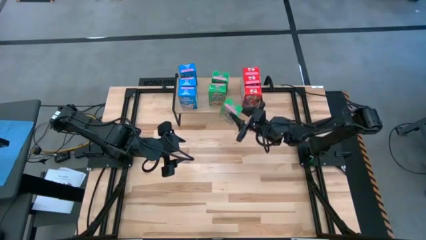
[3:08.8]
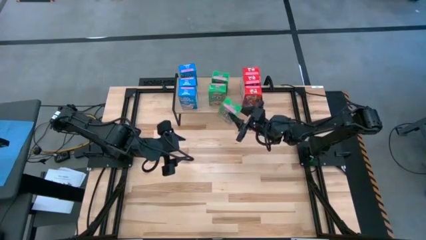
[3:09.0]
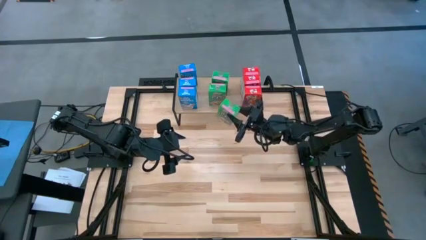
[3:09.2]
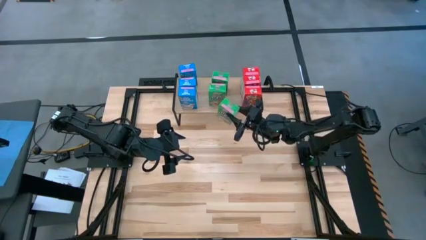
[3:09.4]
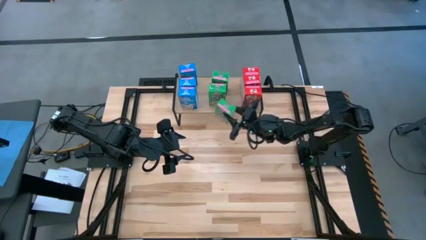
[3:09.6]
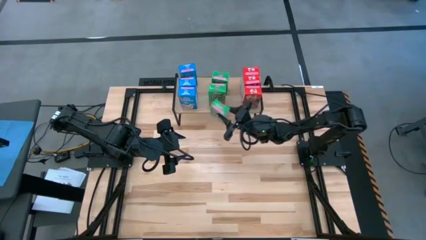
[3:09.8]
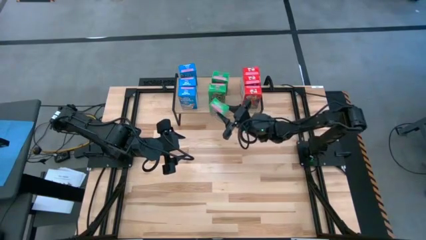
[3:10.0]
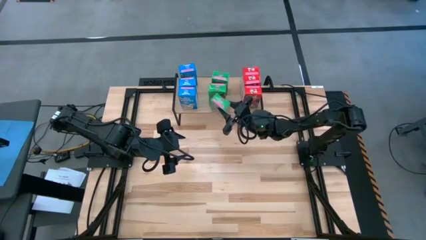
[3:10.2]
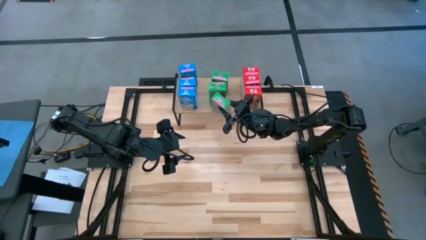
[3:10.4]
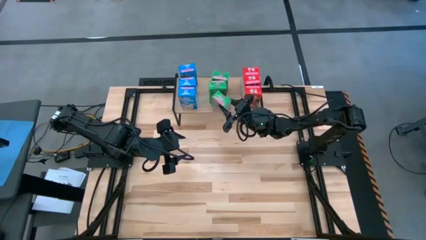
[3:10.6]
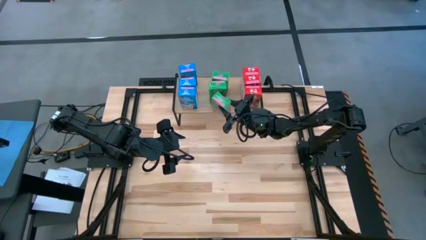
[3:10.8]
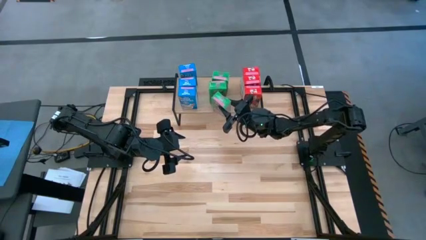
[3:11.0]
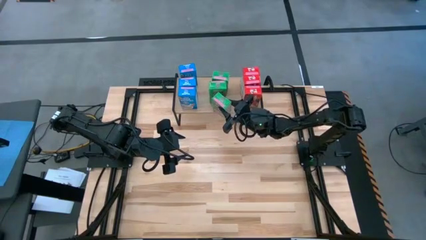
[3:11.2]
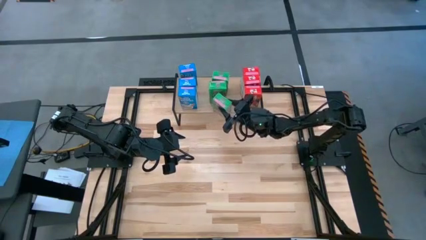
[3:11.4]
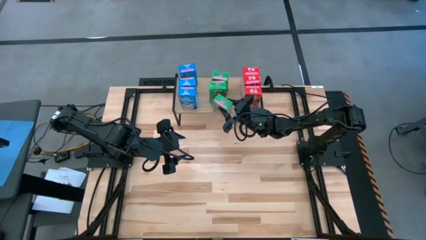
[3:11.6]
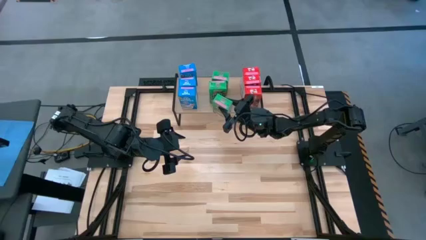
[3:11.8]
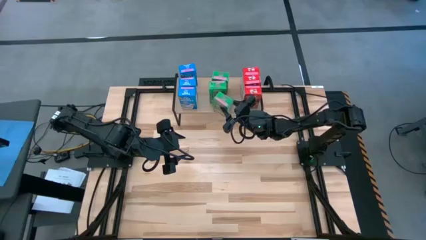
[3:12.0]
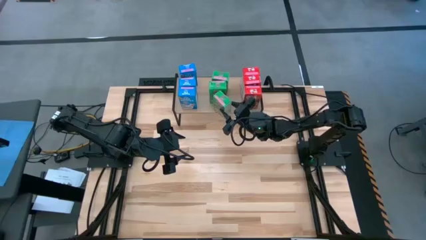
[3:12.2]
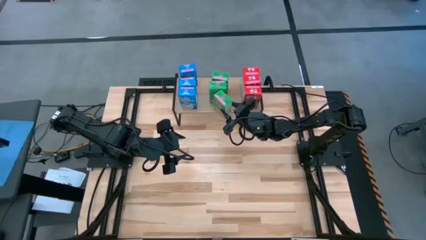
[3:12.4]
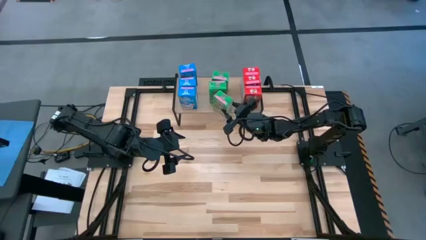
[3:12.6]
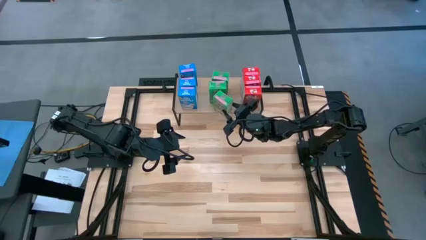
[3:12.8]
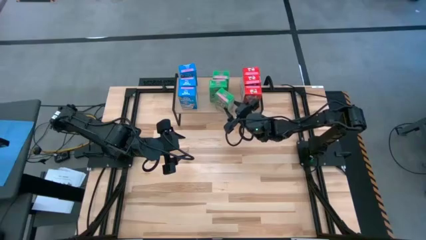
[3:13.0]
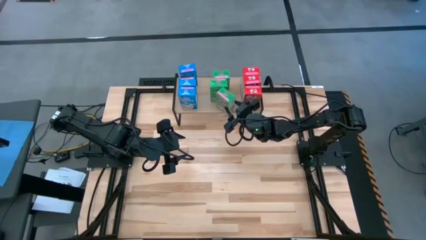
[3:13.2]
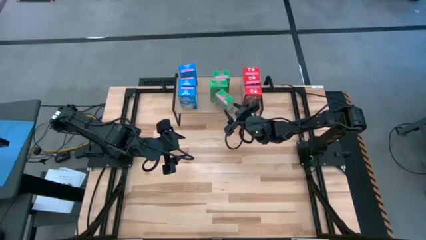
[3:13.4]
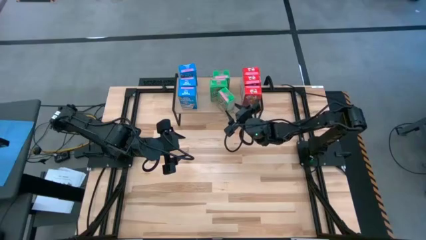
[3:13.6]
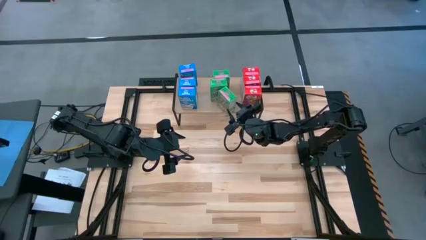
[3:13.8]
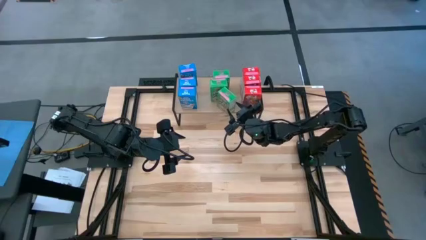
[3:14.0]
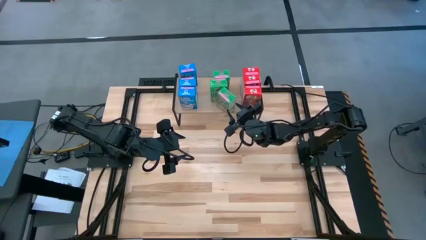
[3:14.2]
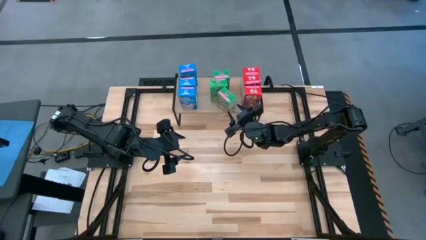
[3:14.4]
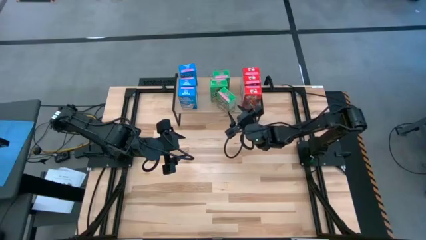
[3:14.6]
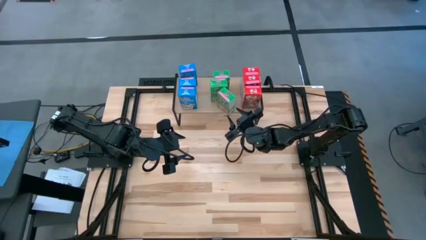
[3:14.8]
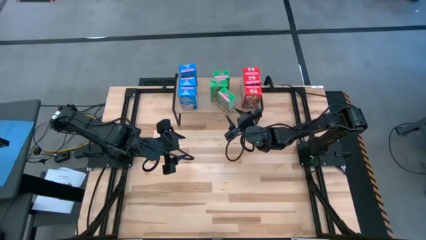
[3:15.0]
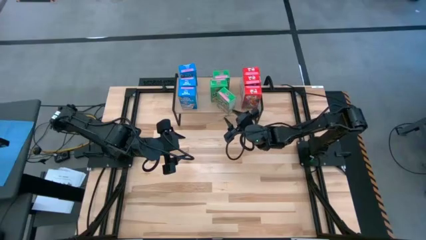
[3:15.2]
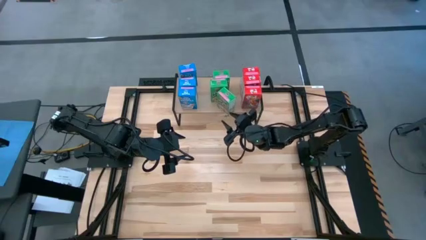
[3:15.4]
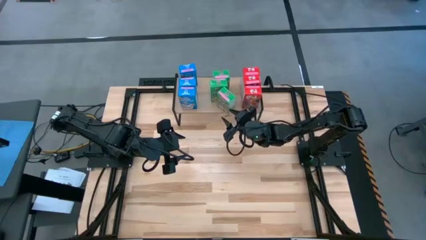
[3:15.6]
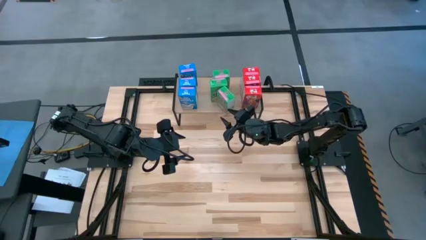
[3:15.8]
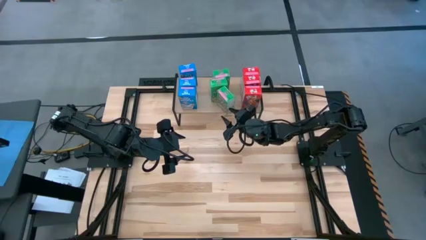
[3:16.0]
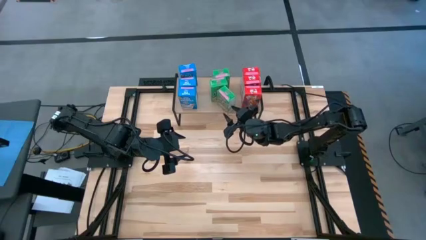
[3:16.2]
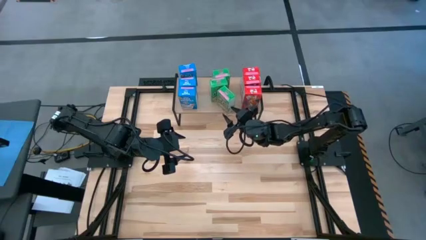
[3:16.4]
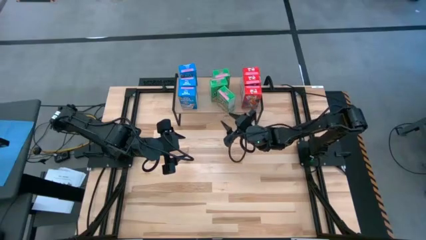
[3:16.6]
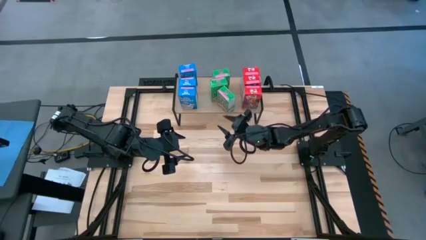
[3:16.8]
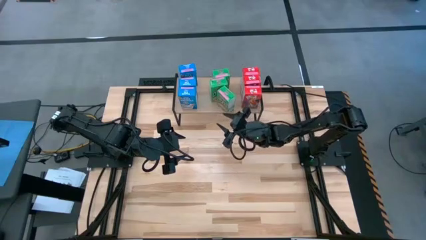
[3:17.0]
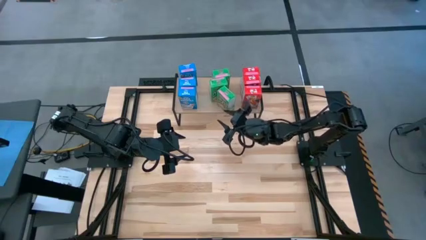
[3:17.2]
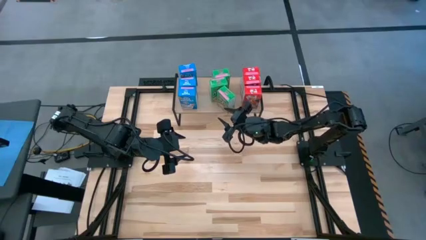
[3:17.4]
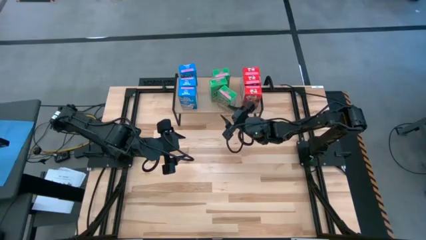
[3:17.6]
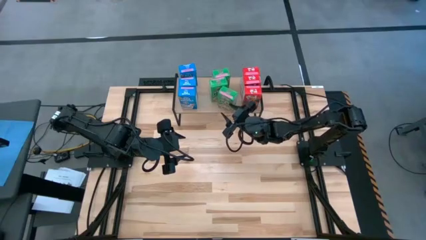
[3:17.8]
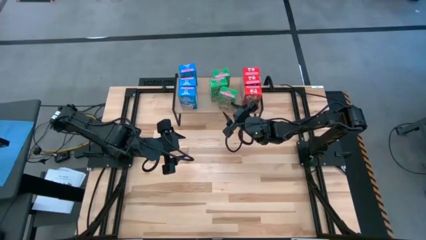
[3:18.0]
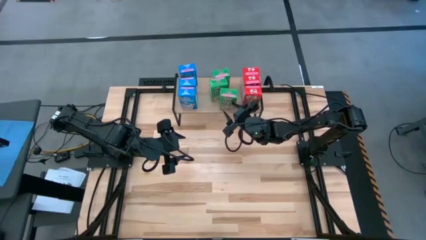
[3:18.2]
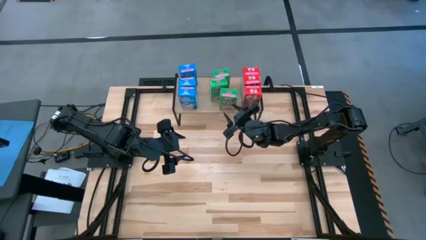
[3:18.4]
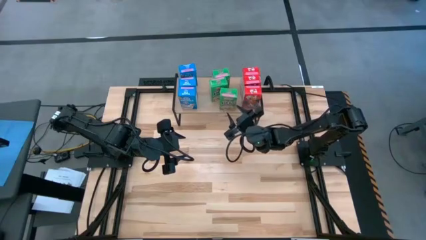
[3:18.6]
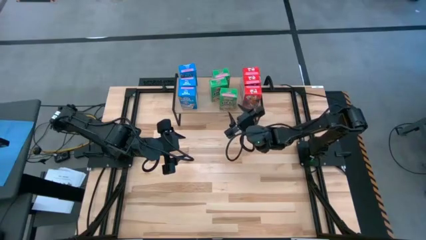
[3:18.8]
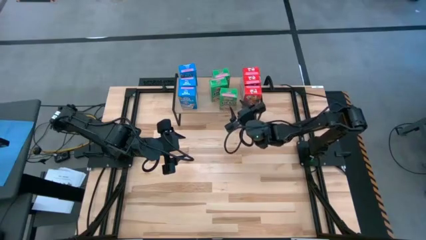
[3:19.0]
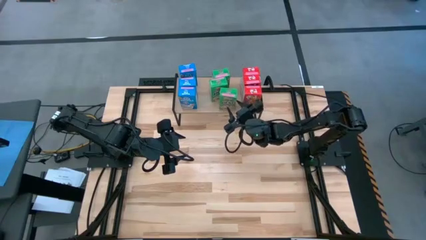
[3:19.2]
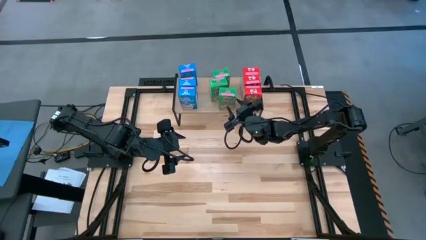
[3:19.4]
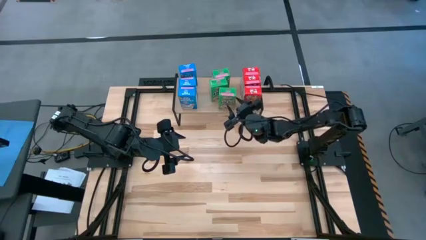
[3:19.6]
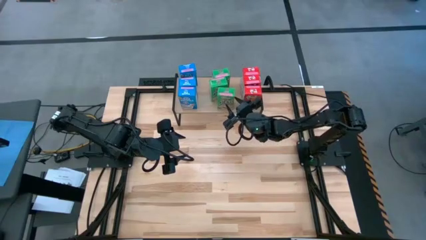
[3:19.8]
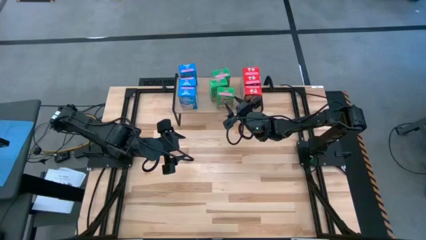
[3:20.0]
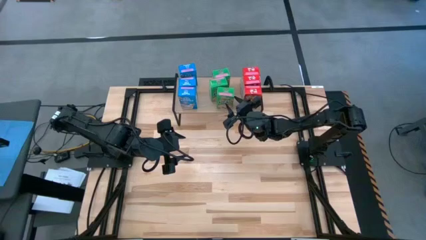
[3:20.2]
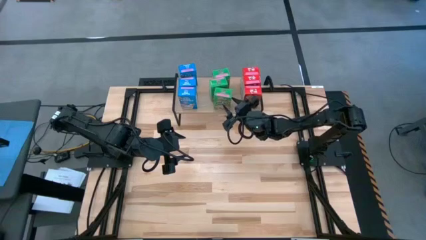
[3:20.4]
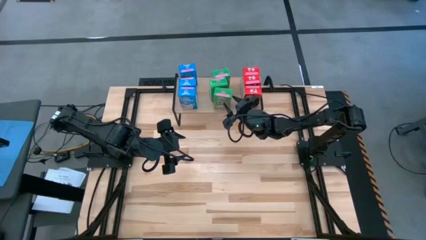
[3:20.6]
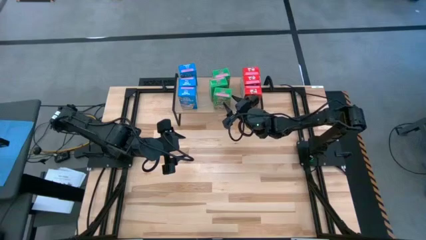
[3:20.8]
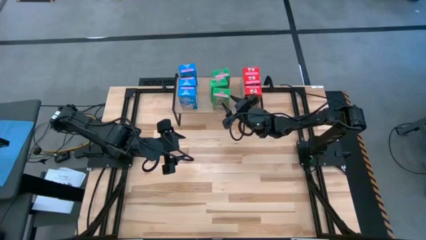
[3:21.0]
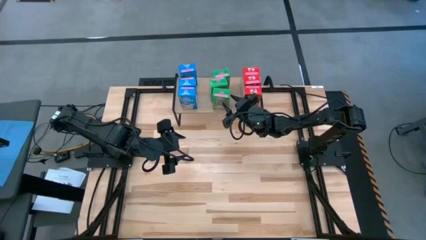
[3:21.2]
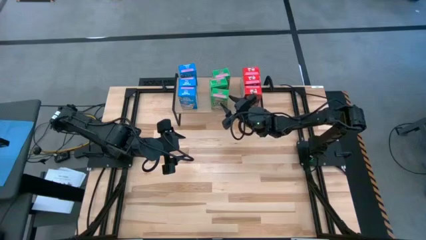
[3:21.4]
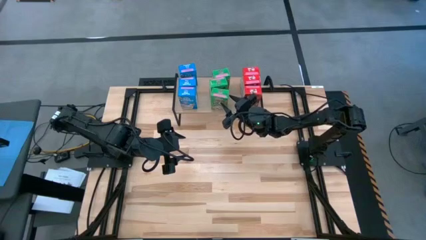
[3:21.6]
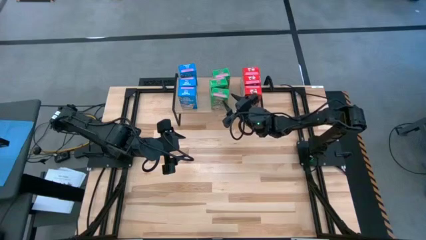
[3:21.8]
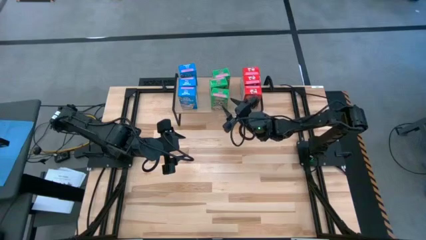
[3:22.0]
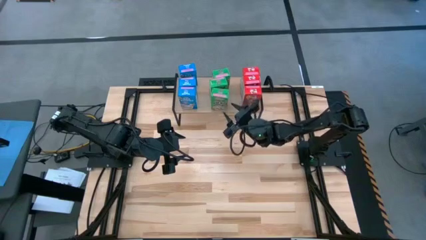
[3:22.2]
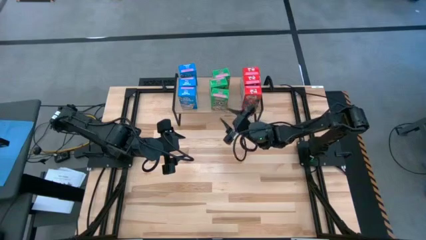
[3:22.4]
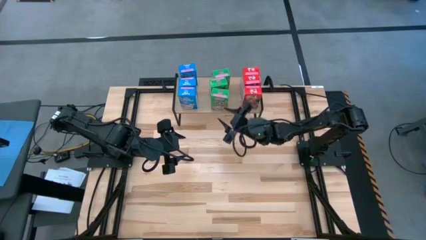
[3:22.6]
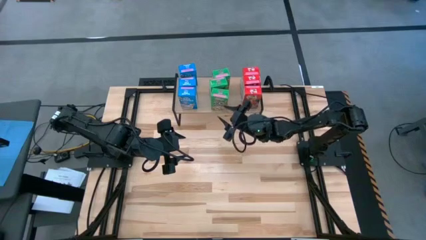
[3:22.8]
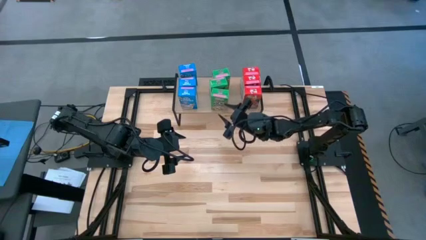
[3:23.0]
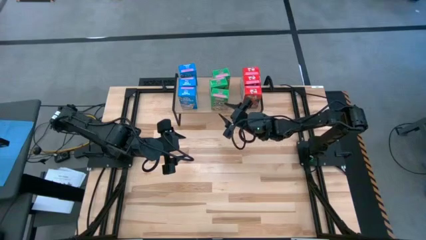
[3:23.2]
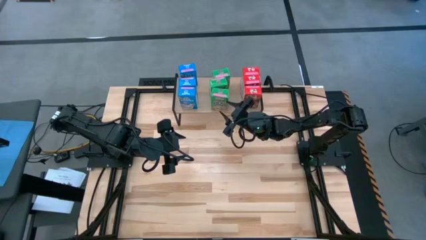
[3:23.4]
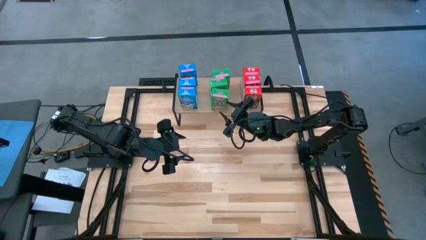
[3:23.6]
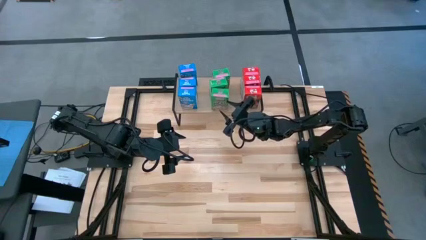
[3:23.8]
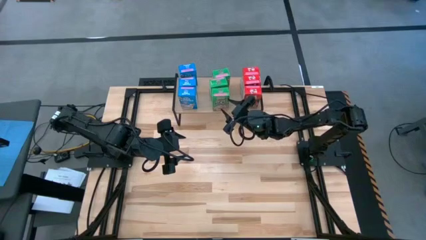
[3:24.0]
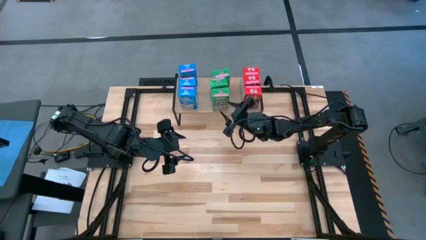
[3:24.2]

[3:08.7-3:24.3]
Task: Stack cereal on shelf
Put the green cereal box on the shelf aligned with the other green cereal boxes
